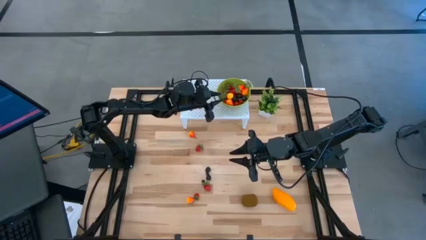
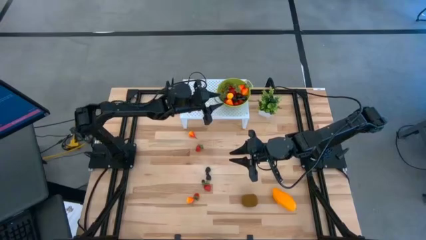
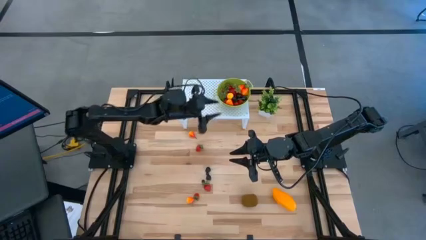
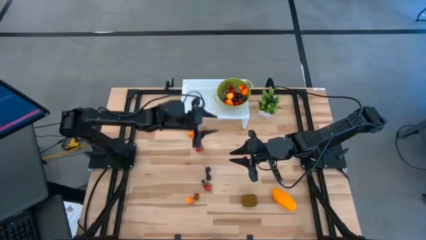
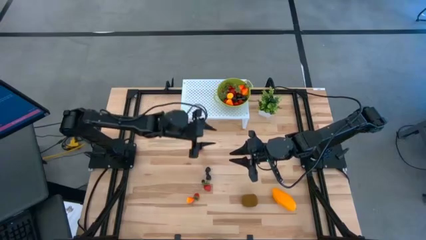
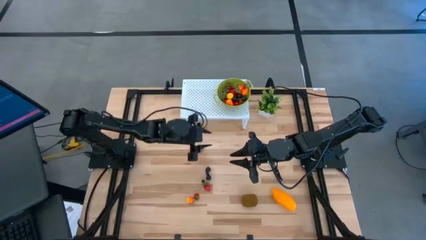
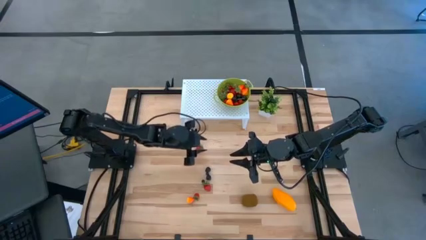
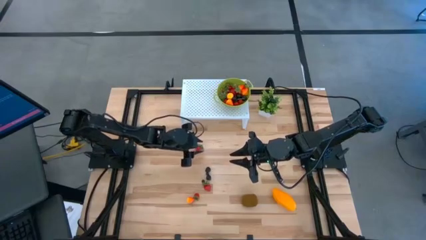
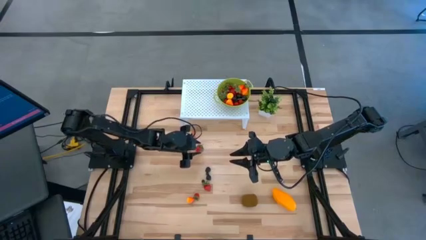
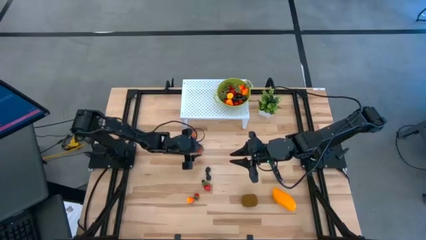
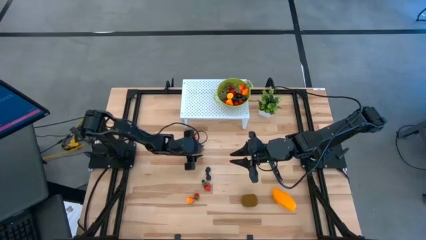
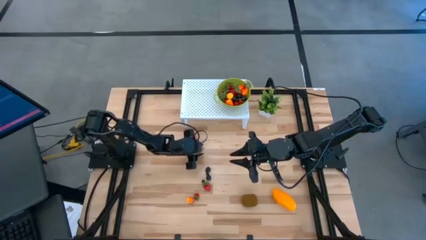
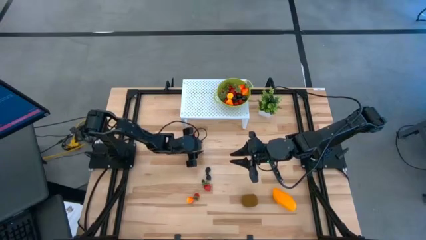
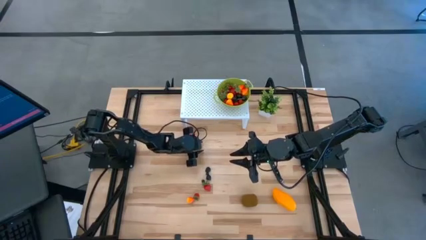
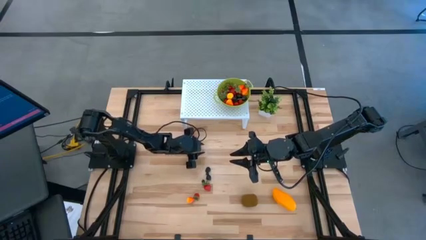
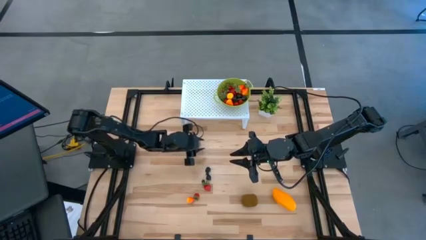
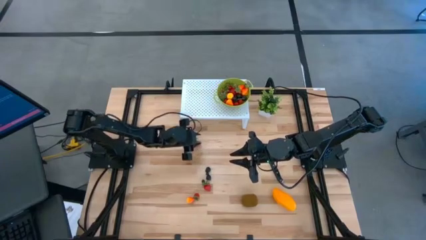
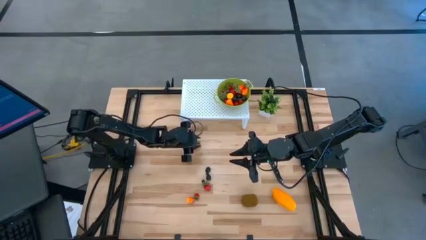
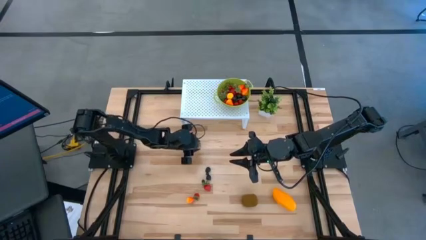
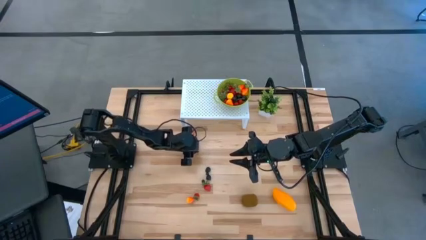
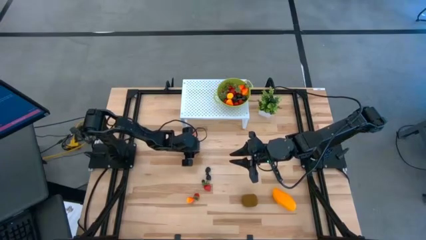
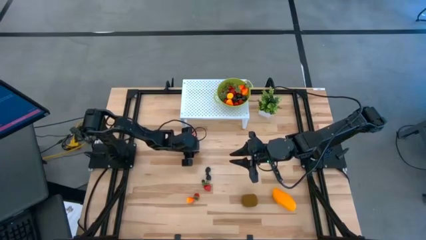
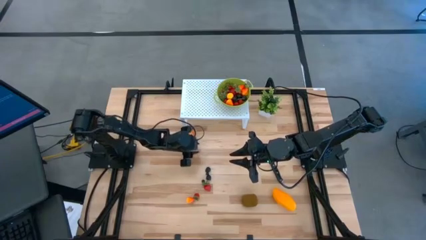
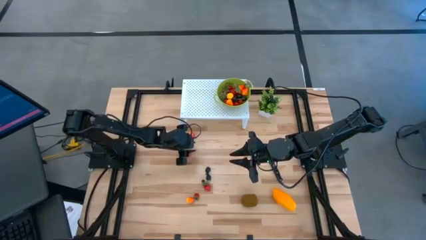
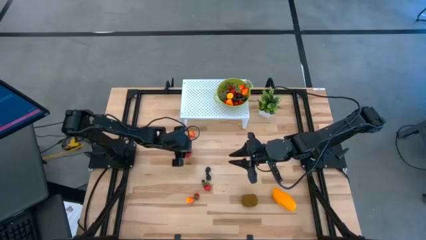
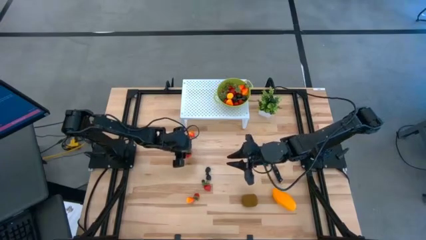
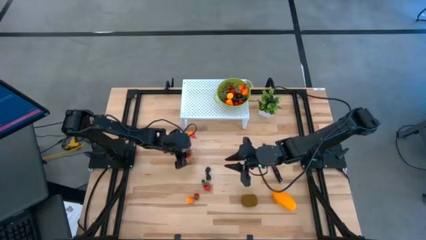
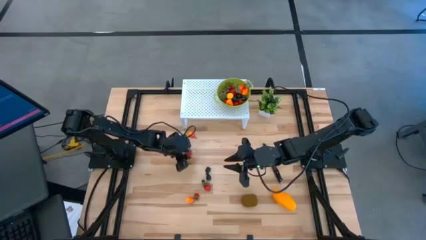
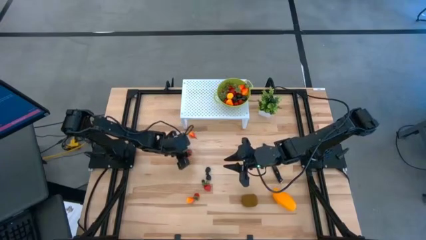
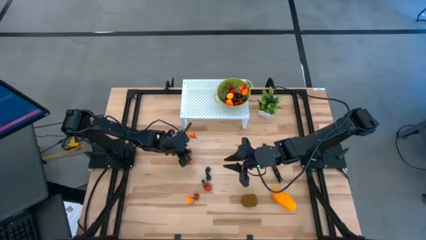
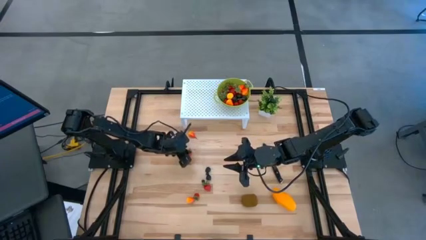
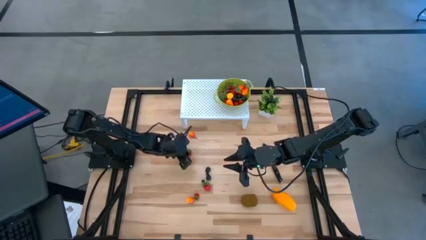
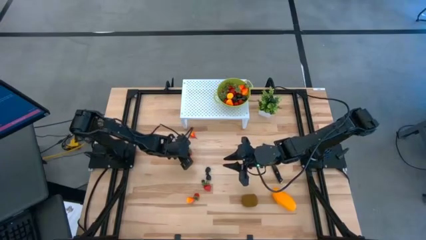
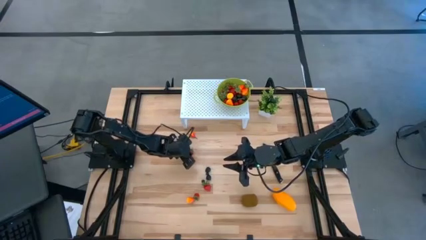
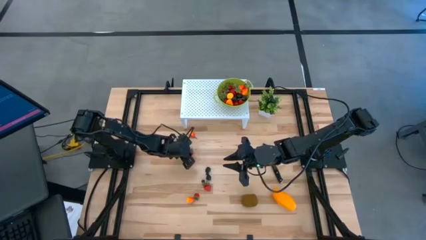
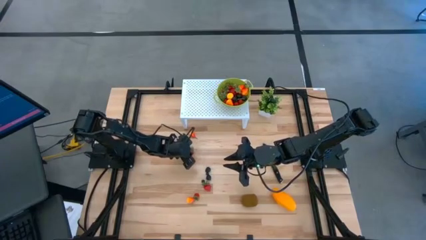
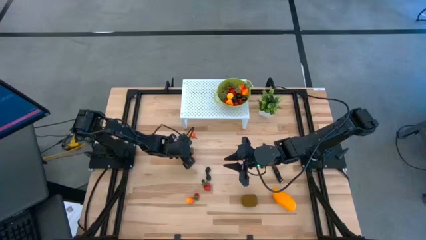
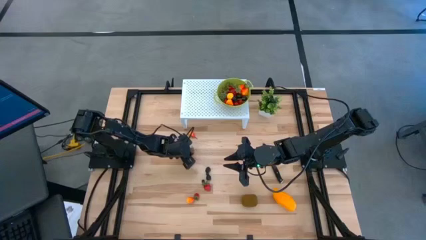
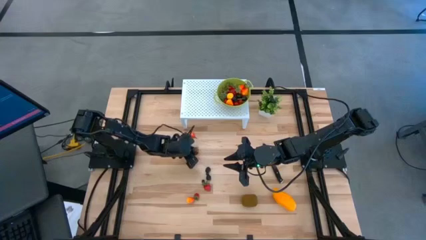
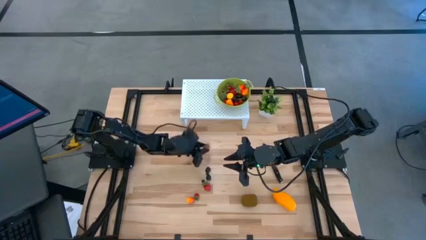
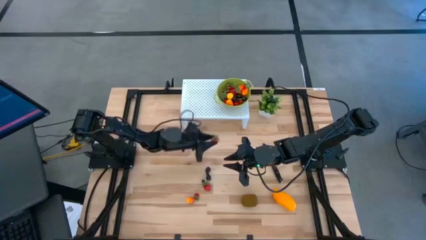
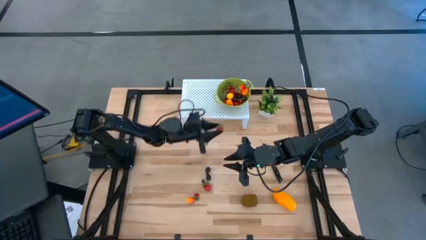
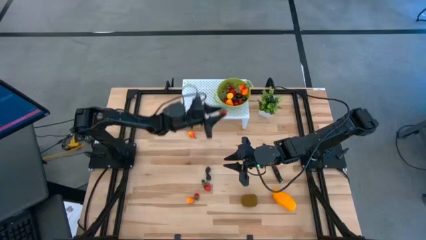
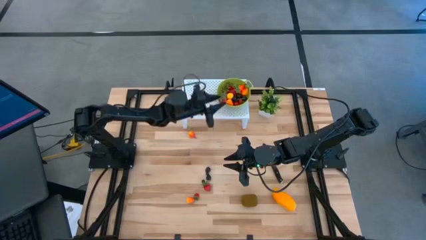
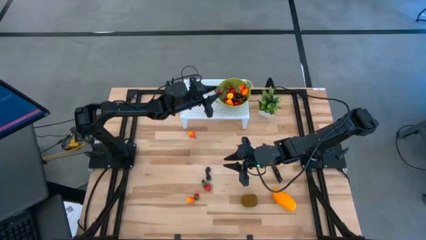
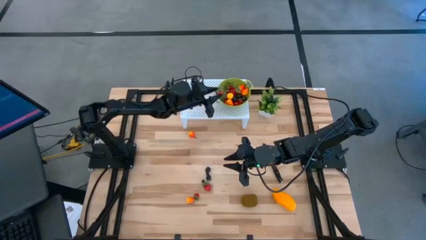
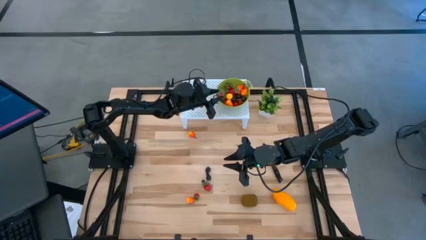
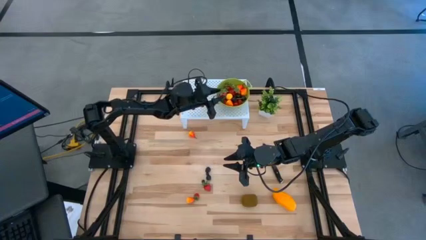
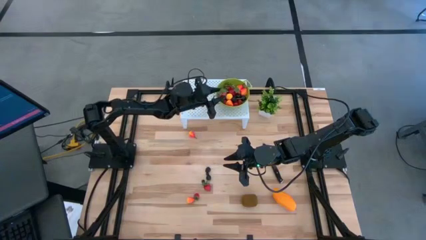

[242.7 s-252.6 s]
Task: Pick & Place Fruit
Put the red strawberry into the green strainer bowl
